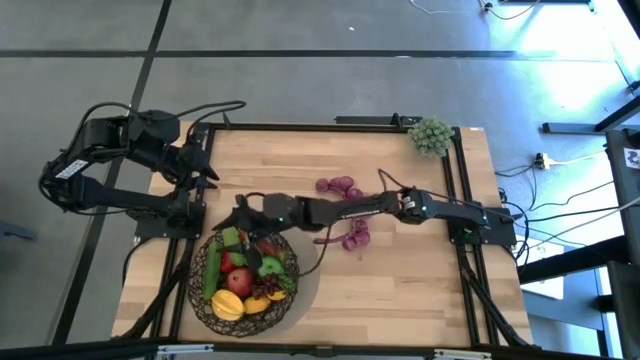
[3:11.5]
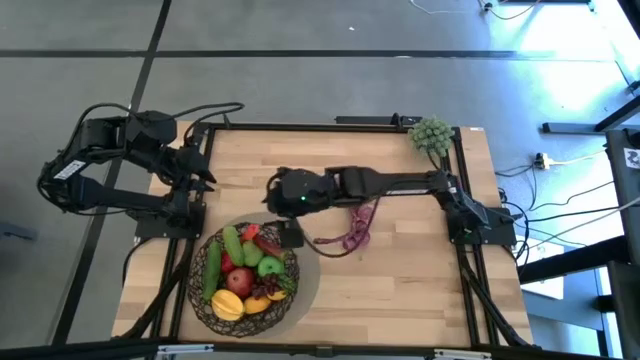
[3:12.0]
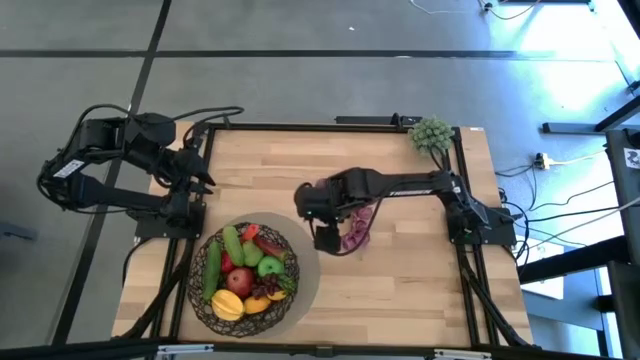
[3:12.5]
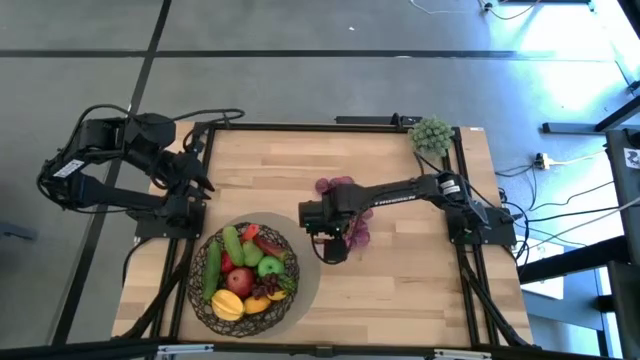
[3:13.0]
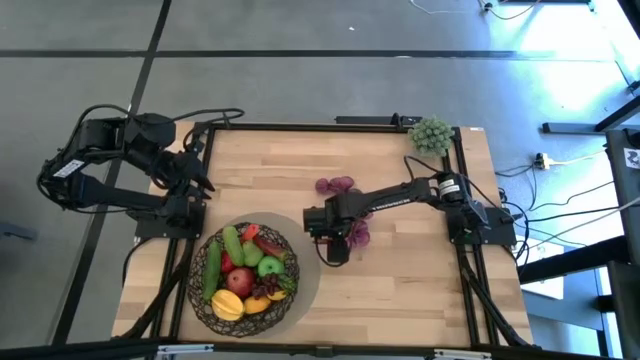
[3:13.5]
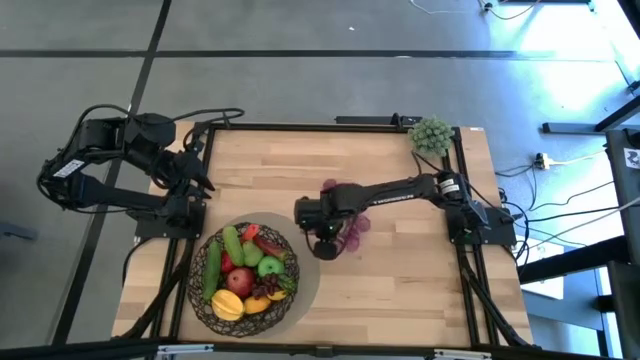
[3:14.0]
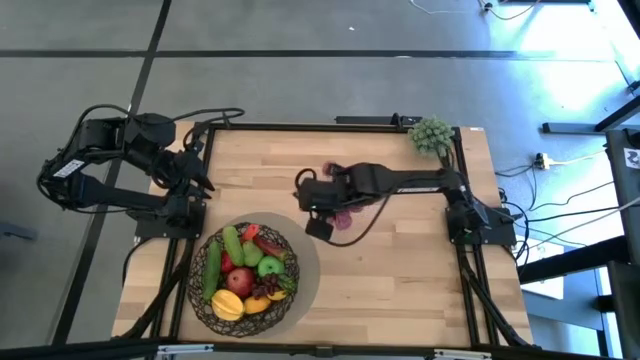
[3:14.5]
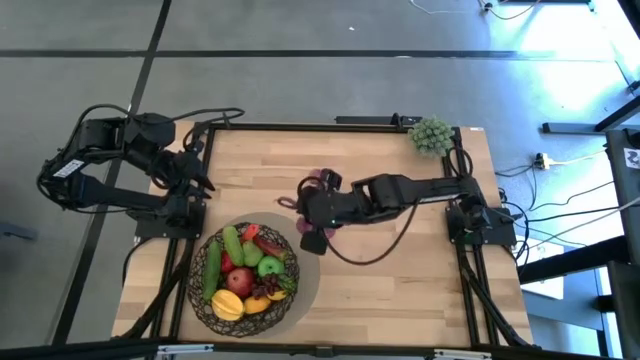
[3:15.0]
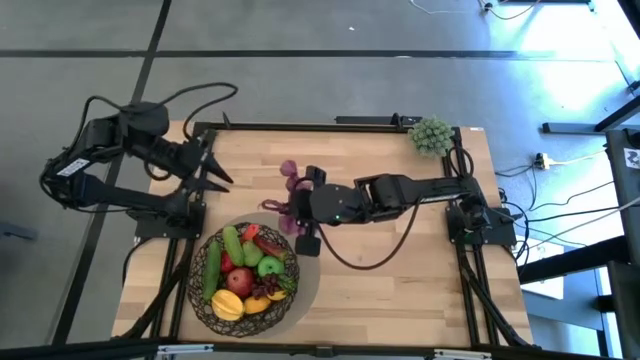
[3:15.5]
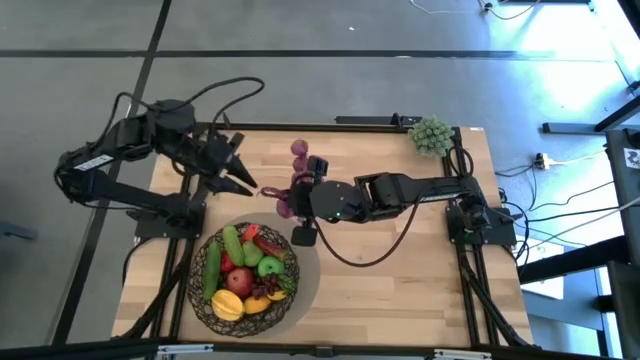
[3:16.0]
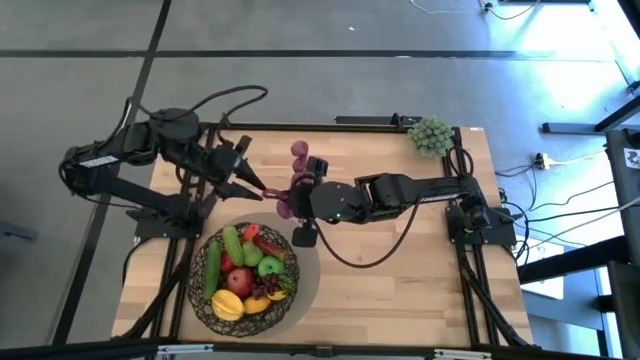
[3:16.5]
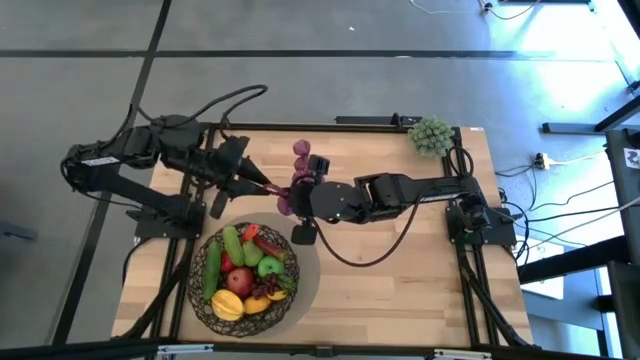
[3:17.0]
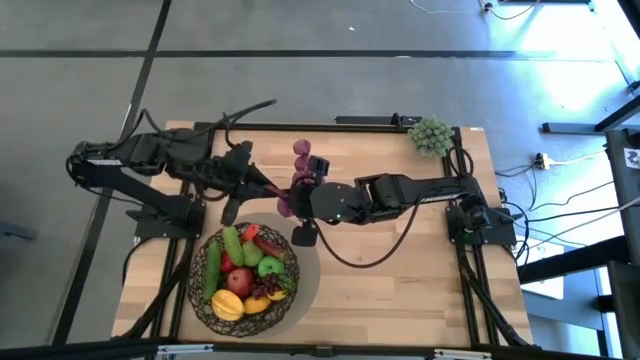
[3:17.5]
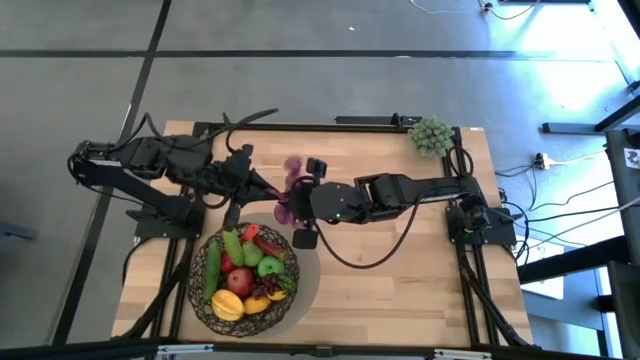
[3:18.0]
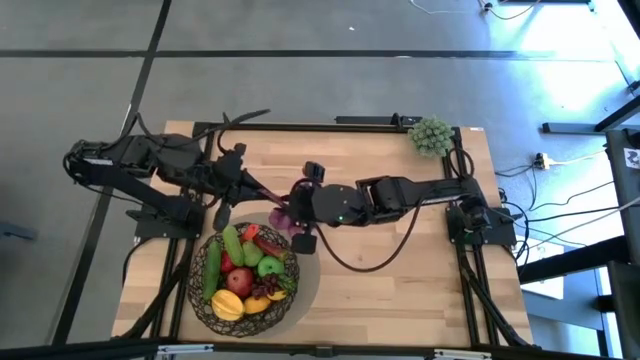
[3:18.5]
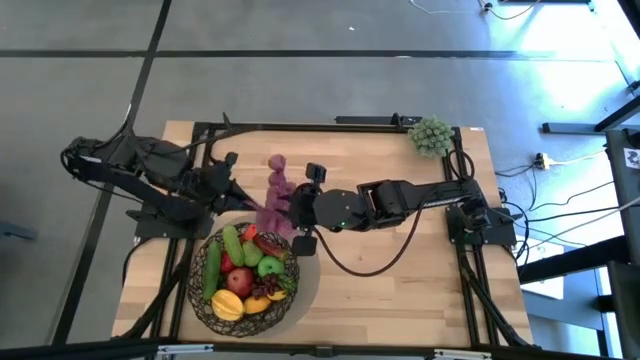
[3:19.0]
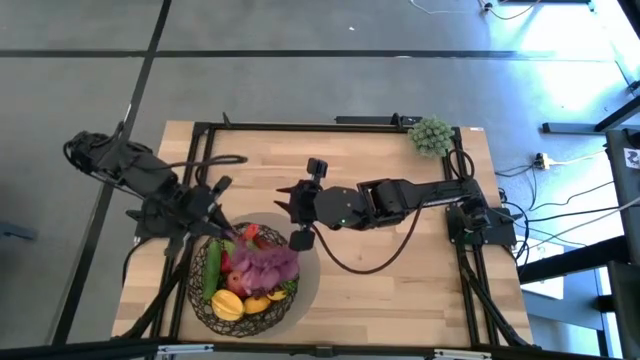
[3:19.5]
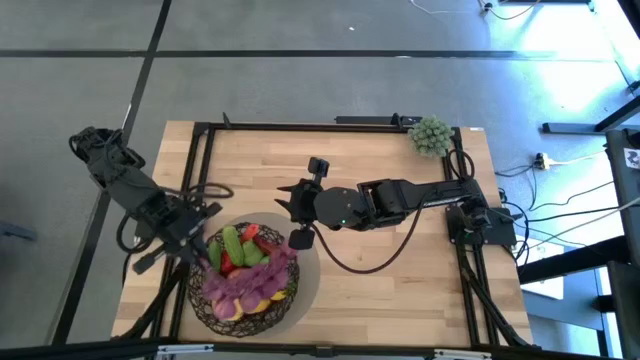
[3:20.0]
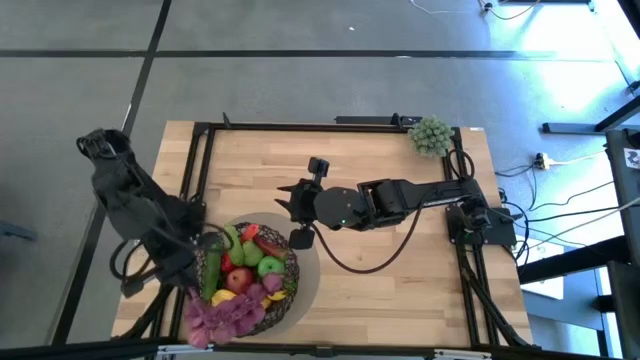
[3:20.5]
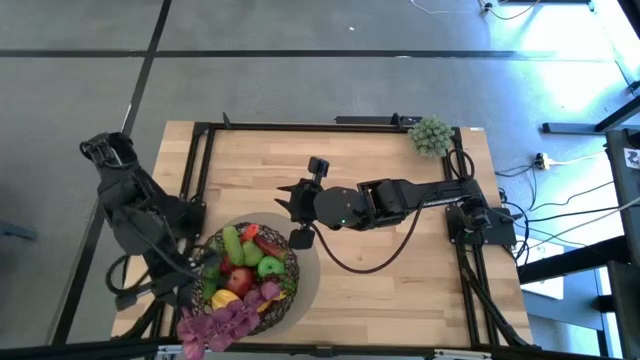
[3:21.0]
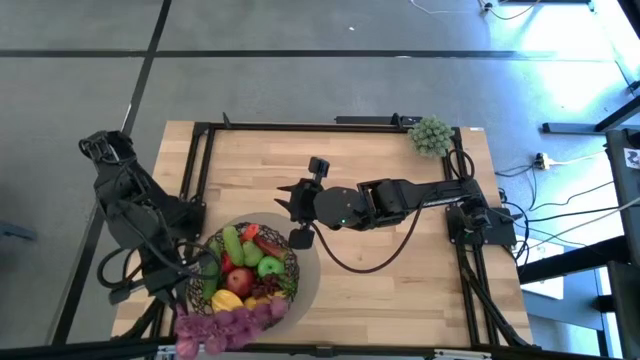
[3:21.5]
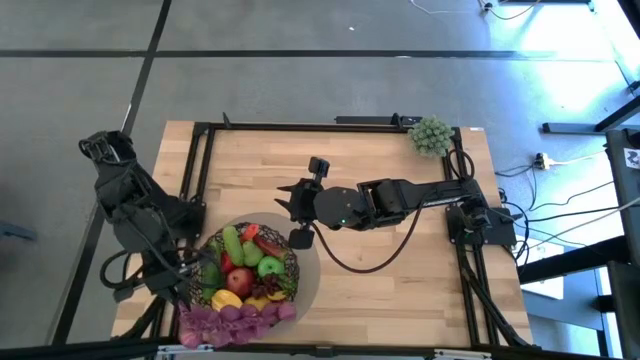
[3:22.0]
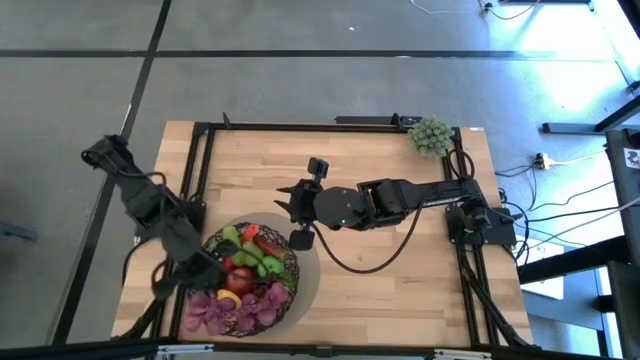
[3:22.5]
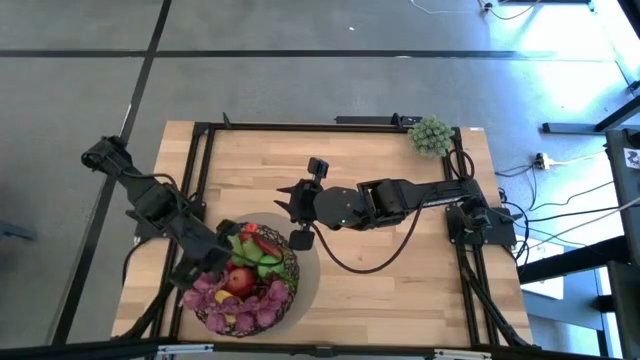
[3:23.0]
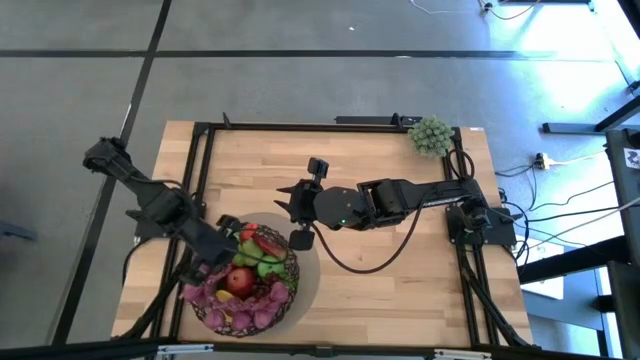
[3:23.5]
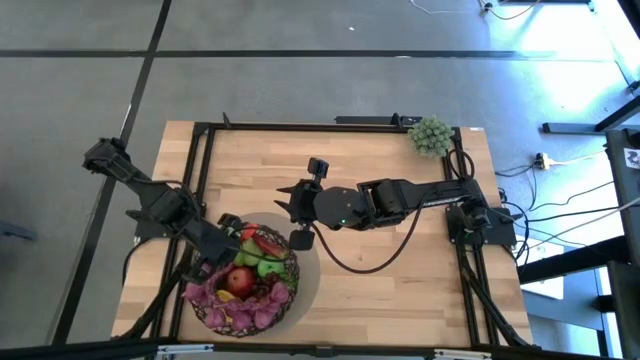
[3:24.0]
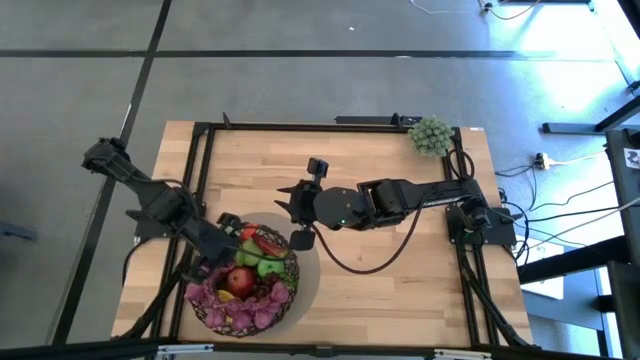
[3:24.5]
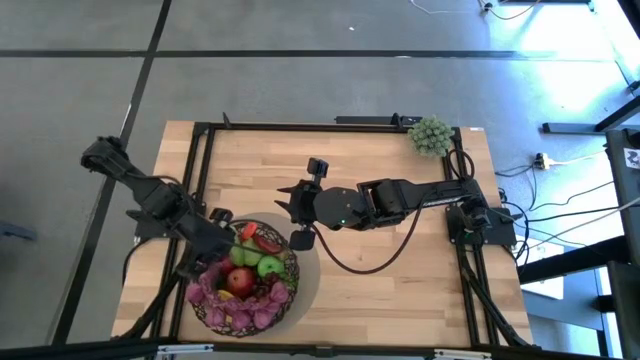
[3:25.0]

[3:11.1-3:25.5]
Task: Build produce basket
Put the purple garlic into the black wire basket

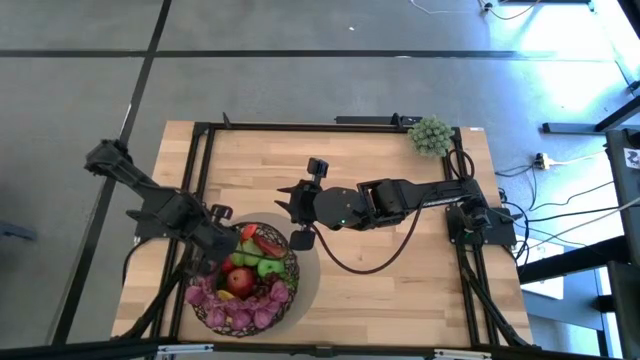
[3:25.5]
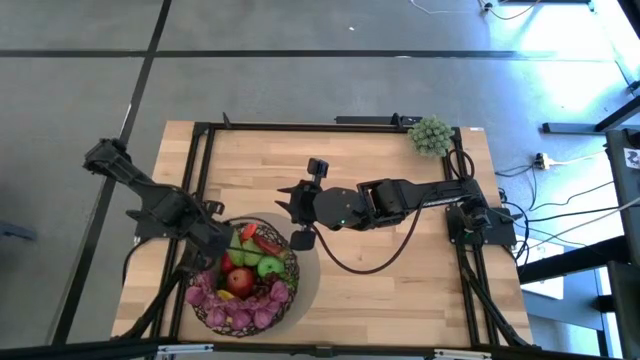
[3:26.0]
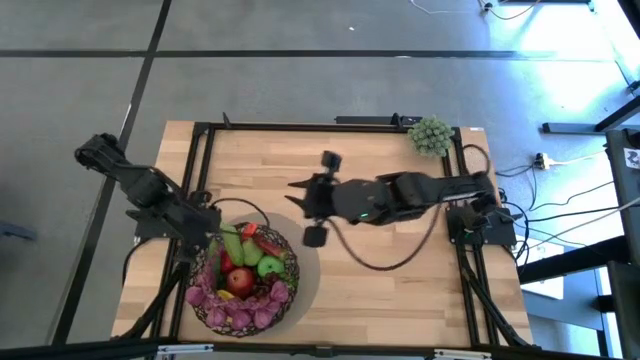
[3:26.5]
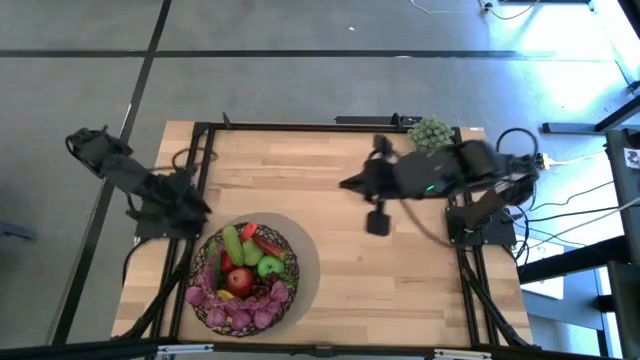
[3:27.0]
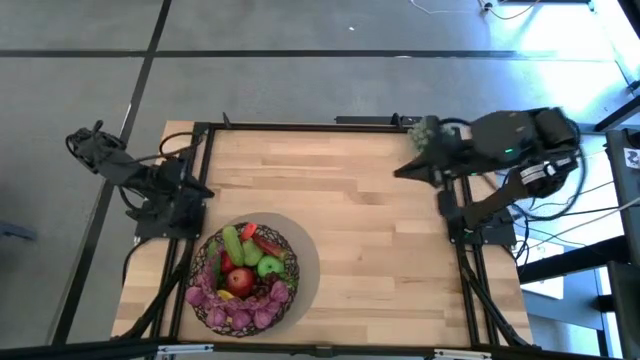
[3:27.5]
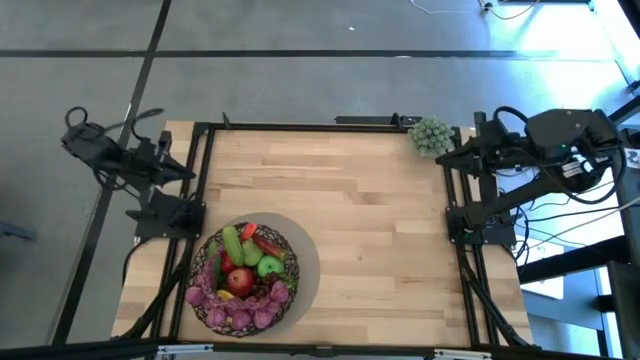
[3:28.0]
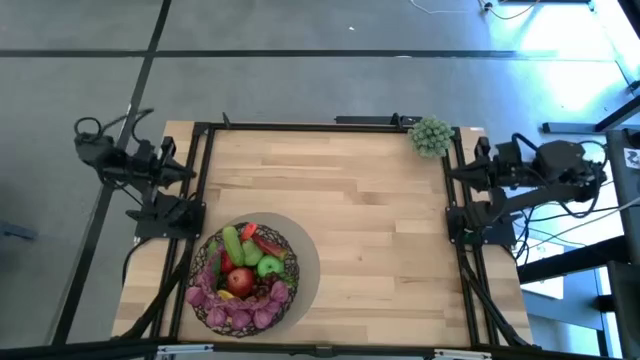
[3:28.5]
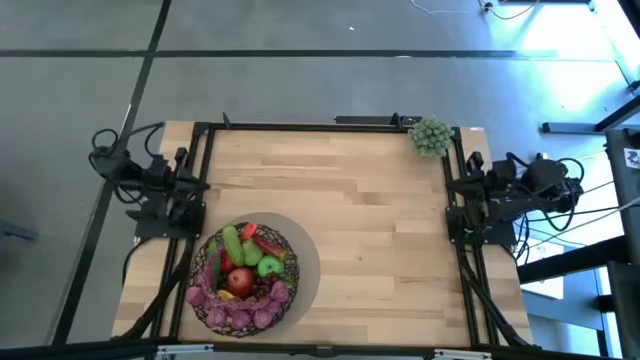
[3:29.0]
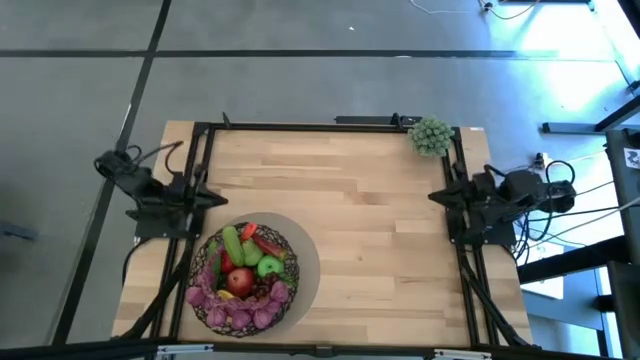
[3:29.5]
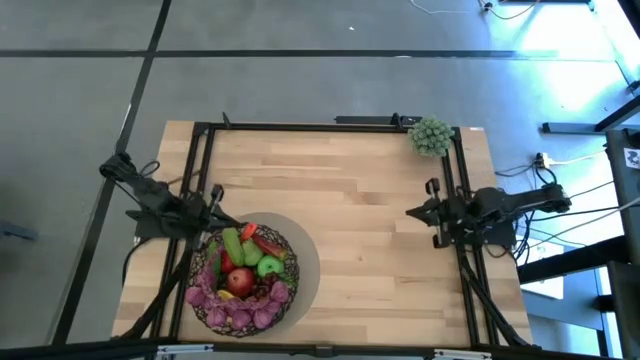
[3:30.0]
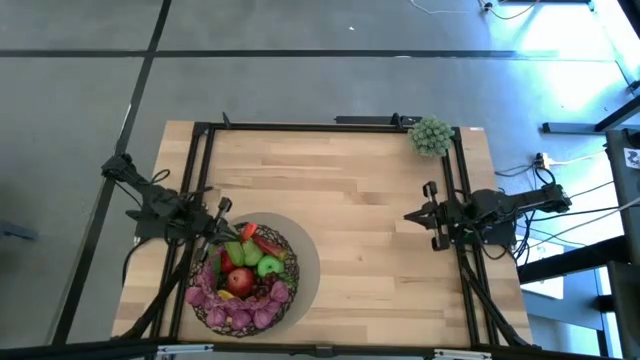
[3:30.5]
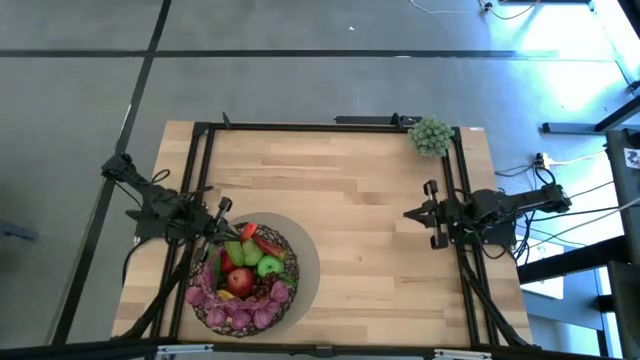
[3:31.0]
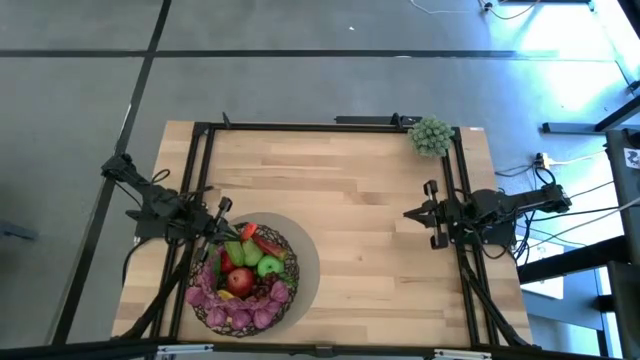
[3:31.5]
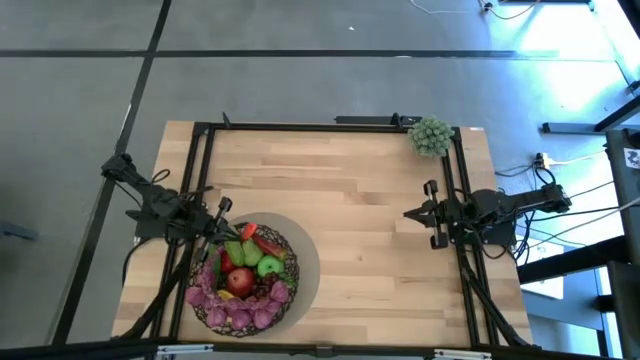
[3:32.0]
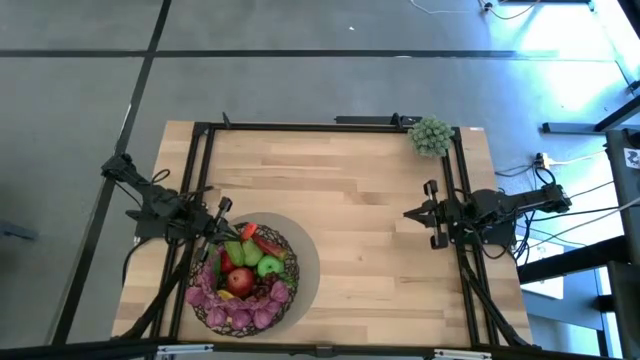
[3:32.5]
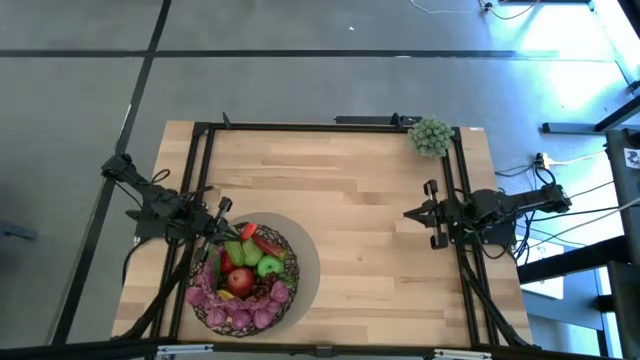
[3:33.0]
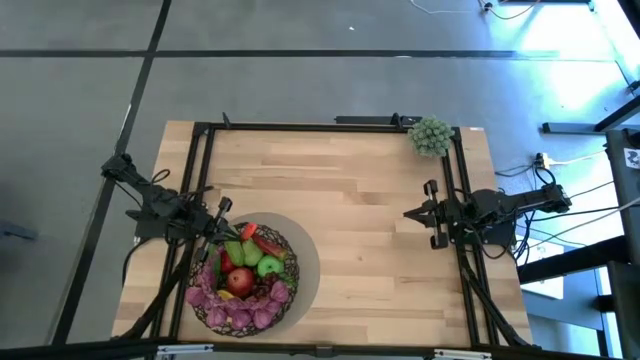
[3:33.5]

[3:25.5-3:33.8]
Return to Home Position
